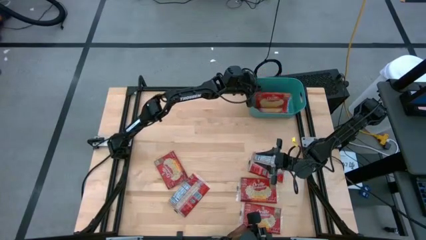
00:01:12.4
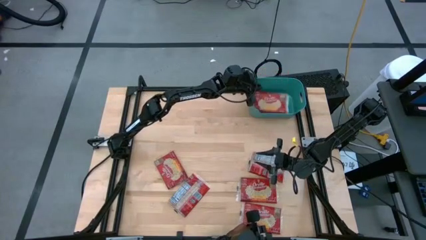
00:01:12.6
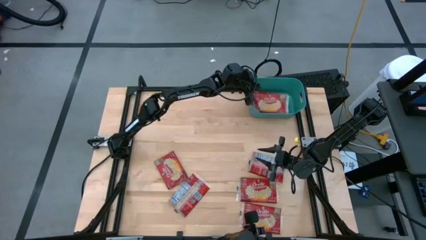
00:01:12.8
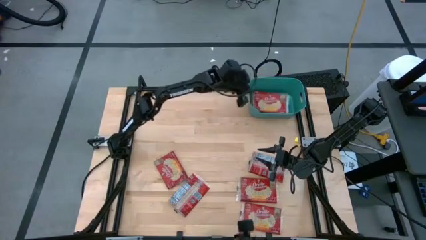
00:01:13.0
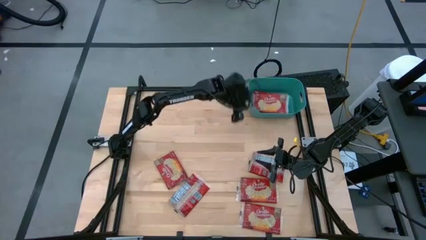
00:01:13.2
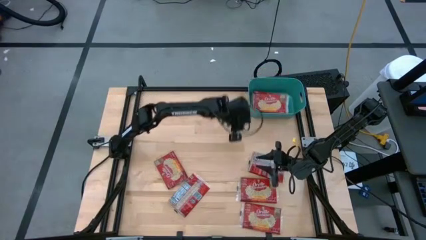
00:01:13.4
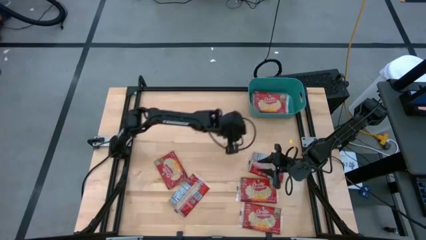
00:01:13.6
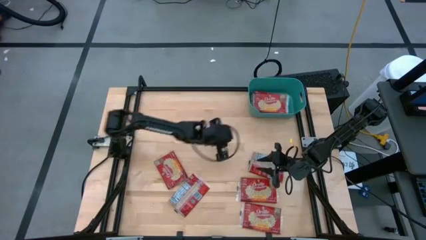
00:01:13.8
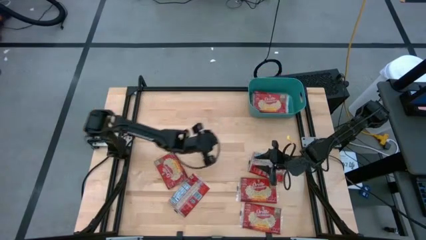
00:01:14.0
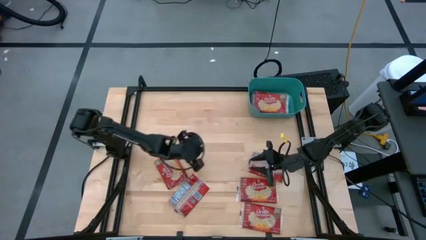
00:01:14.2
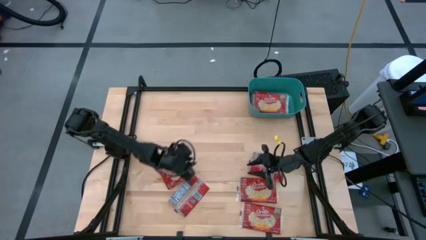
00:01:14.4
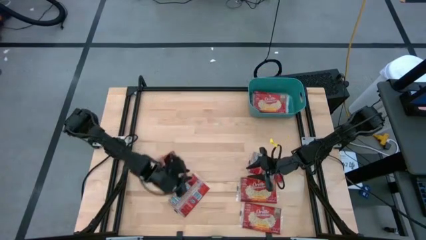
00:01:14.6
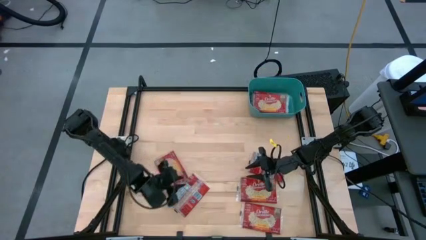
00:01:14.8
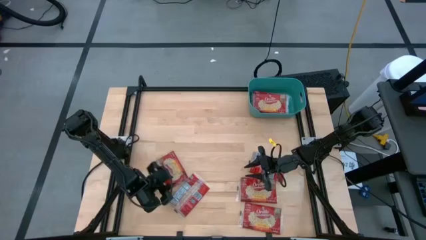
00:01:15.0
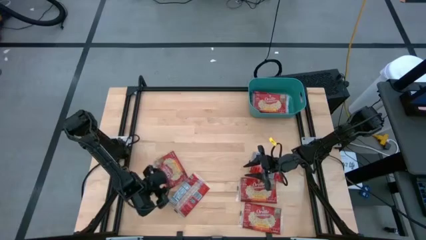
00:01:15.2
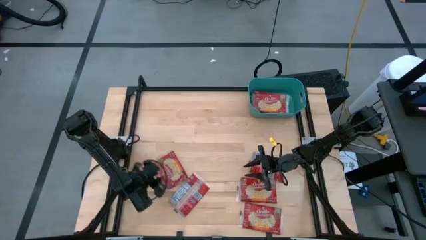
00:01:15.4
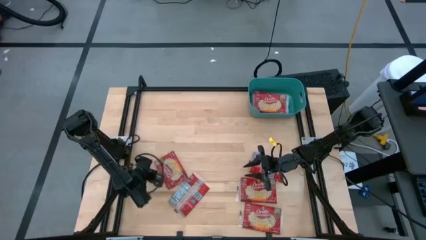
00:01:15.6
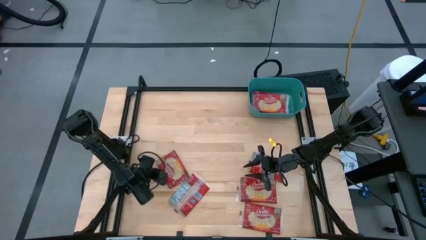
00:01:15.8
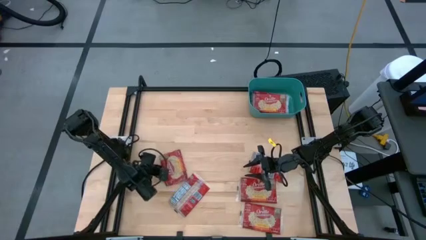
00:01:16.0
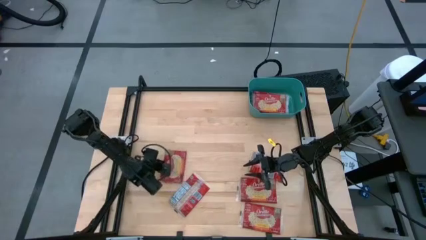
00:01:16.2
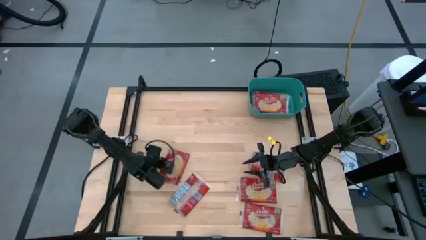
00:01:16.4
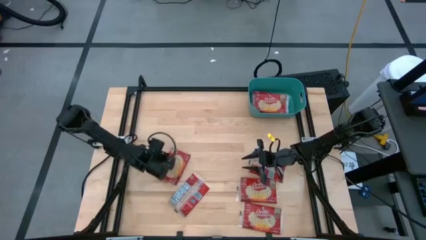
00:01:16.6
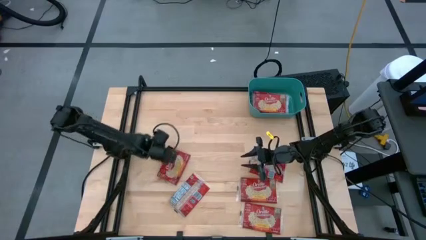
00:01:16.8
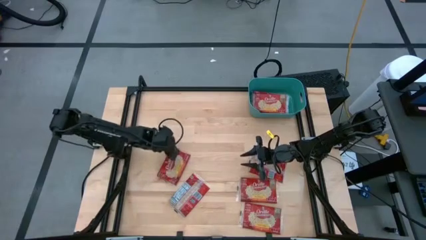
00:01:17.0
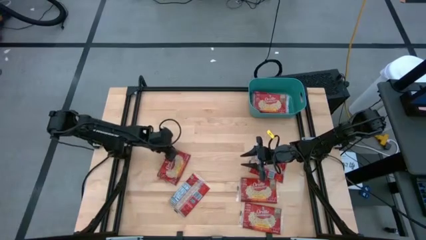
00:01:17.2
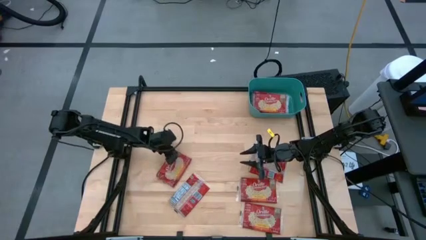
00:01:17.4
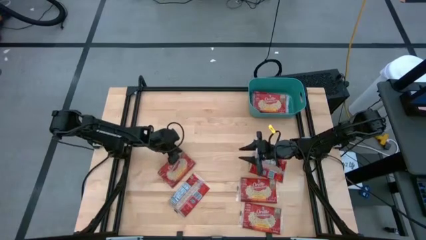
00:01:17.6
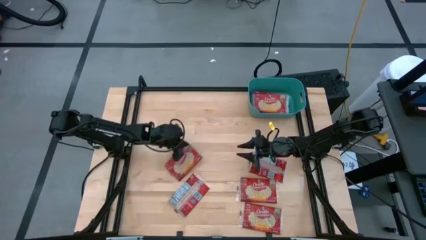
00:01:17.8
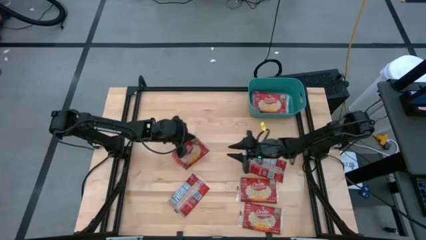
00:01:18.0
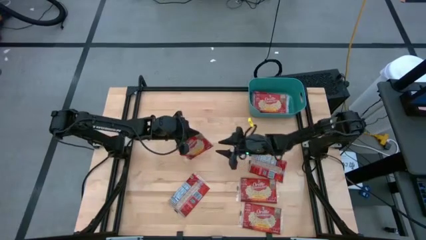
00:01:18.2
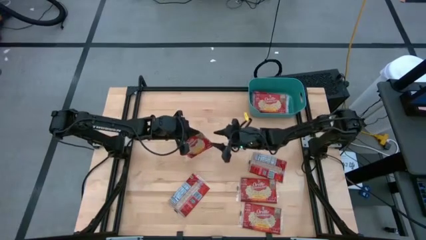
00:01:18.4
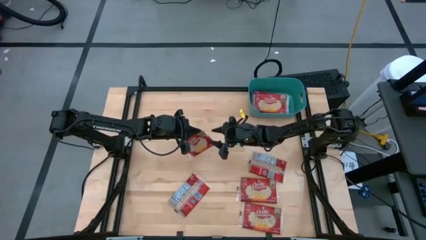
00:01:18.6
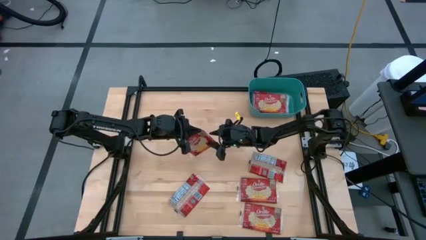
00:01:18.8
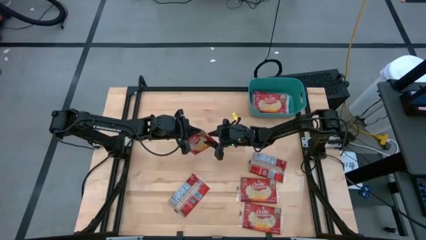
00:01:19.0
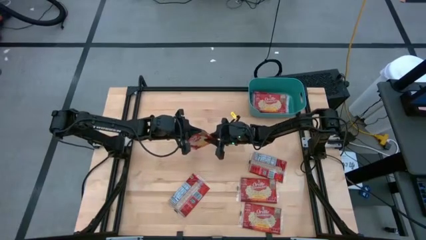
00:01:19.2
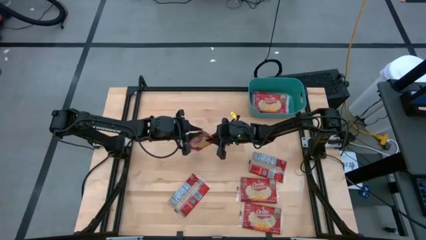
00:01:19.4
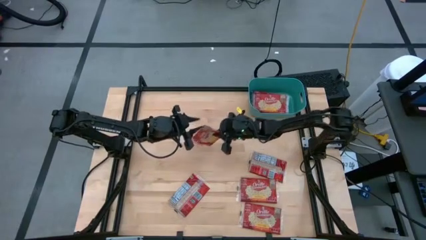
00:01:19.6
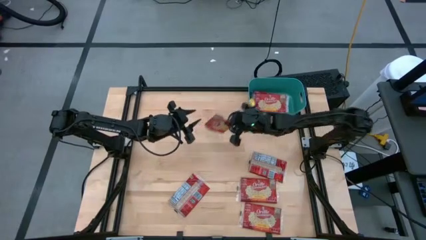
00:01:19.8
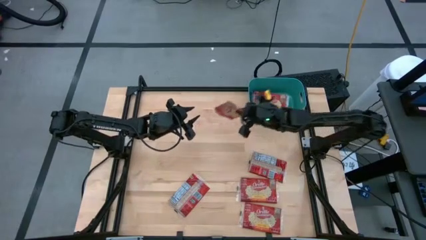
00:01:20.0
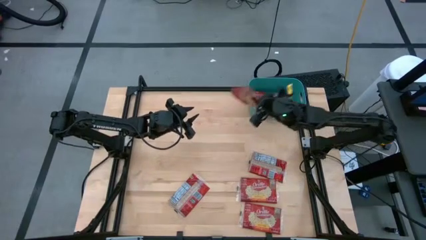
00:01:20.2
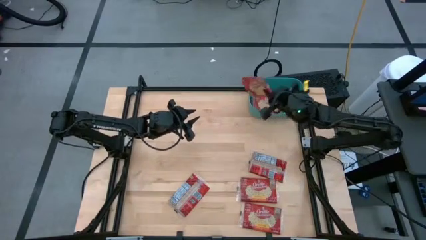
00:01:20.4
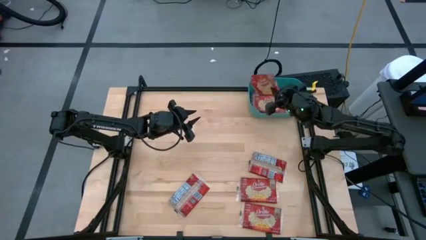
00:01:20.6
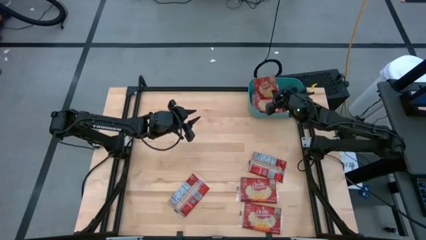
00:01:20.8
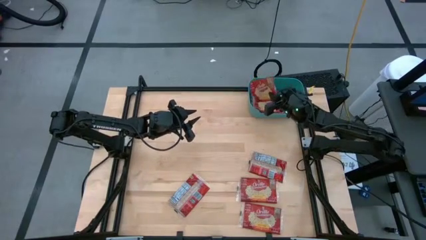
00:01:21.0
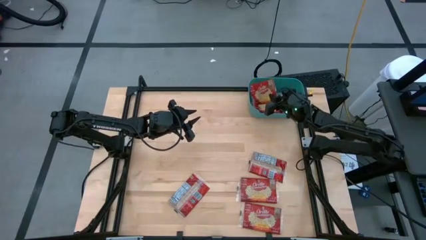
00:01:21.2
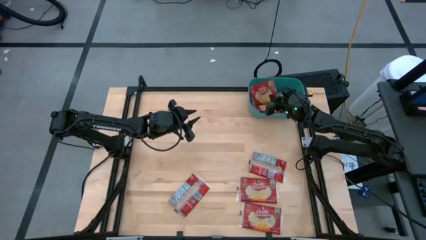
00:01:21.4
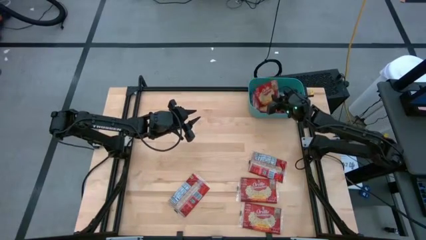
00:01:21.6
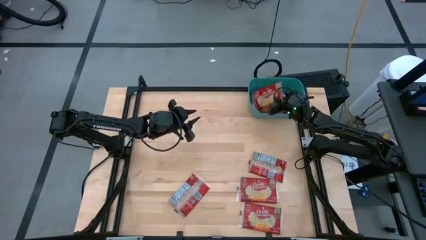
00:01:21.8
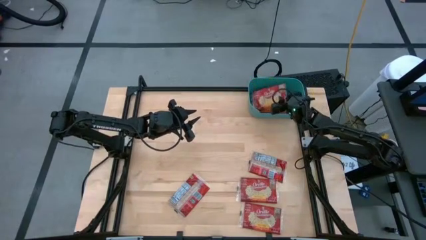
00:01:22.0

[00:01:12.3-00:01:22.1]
Task: Sort popcorn bags into baskets
Put the red popcorn bag into the blue bin

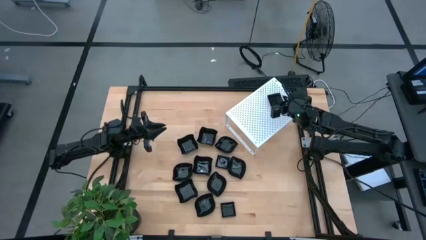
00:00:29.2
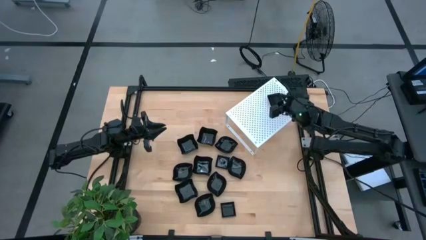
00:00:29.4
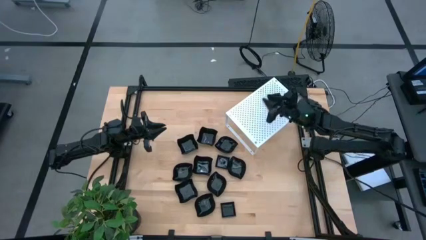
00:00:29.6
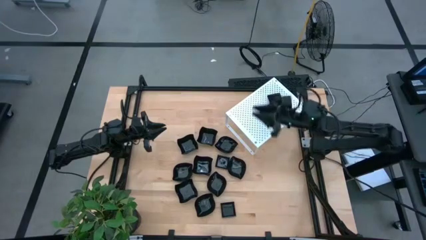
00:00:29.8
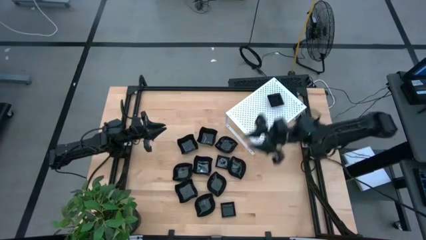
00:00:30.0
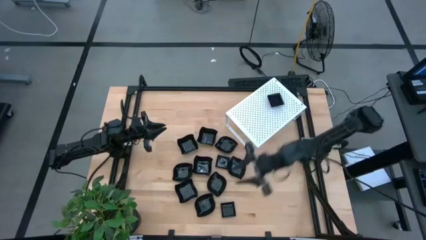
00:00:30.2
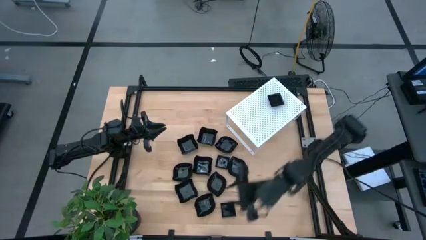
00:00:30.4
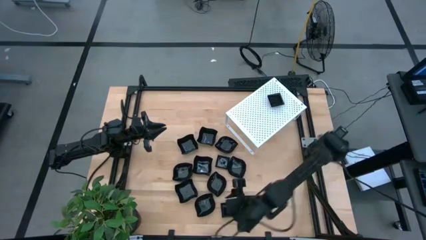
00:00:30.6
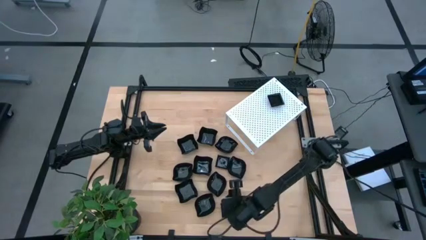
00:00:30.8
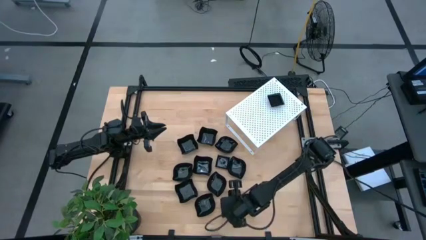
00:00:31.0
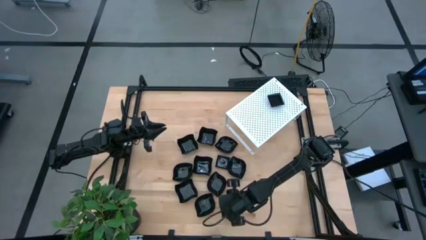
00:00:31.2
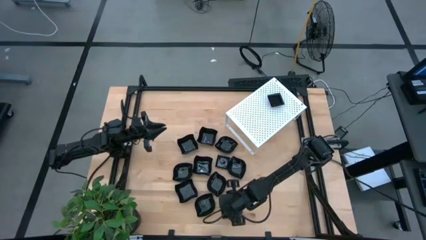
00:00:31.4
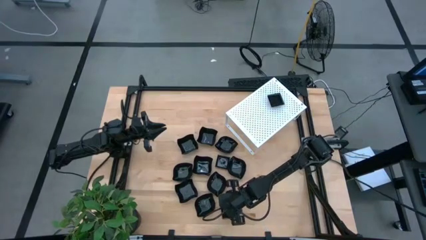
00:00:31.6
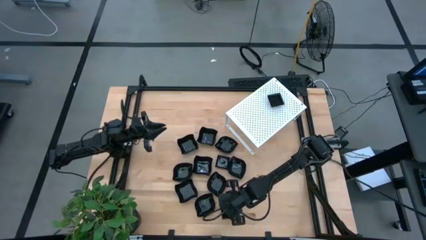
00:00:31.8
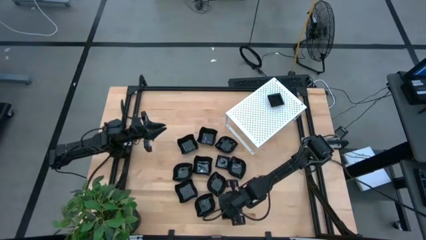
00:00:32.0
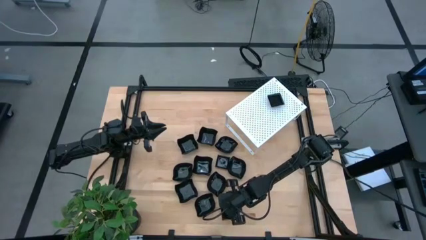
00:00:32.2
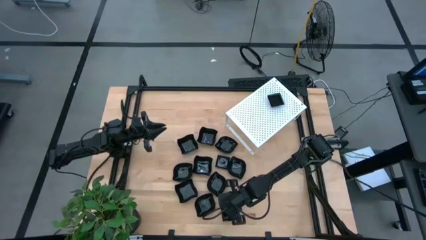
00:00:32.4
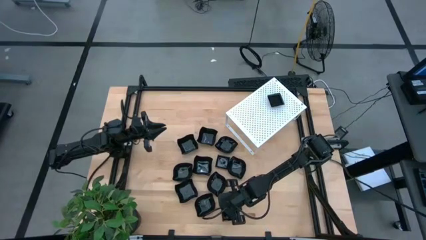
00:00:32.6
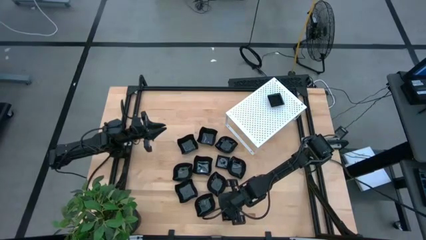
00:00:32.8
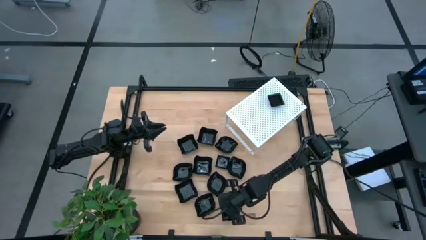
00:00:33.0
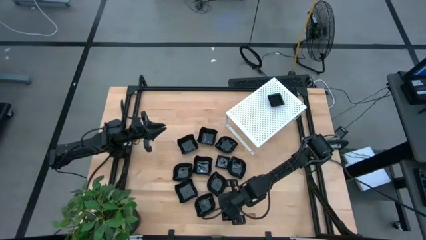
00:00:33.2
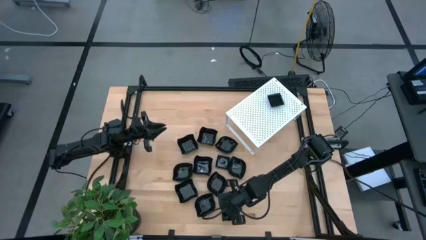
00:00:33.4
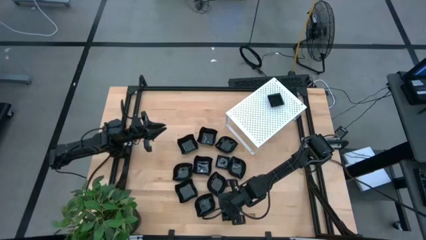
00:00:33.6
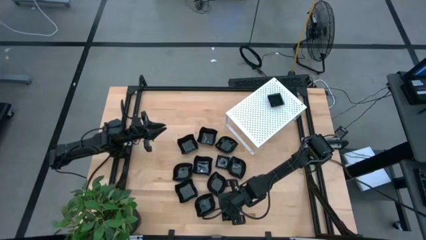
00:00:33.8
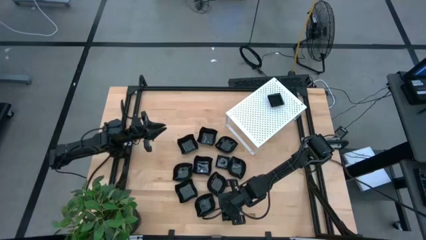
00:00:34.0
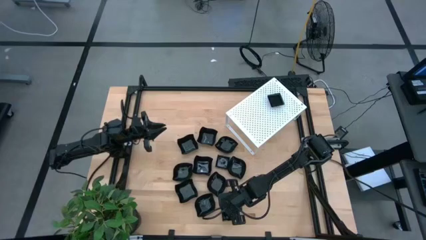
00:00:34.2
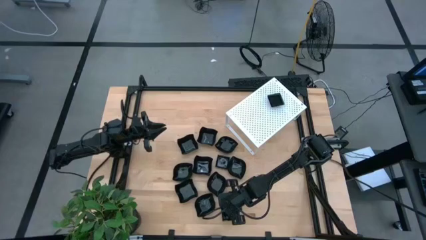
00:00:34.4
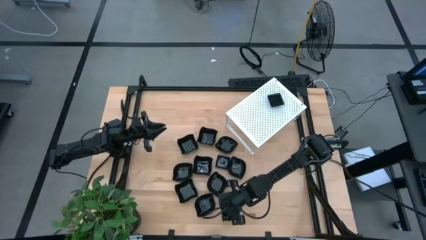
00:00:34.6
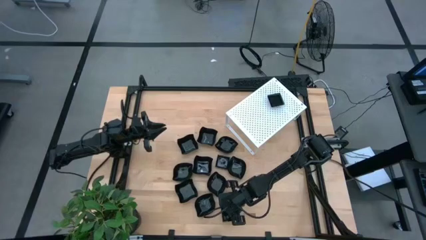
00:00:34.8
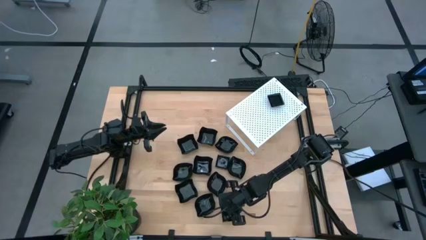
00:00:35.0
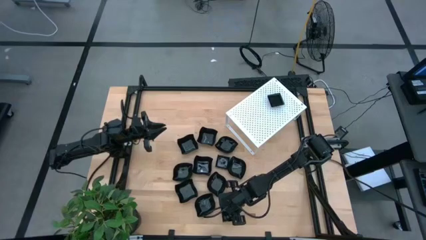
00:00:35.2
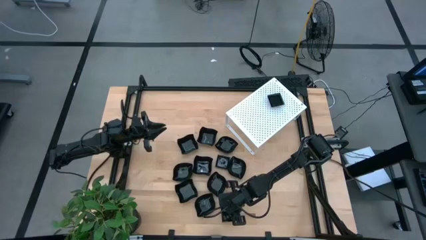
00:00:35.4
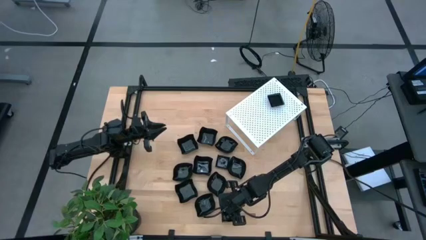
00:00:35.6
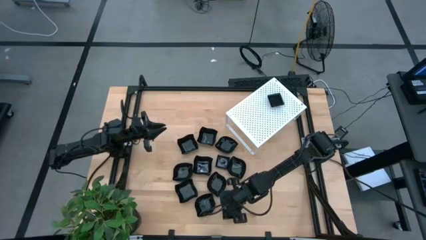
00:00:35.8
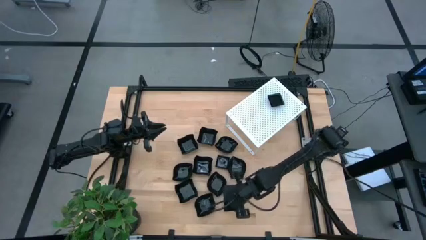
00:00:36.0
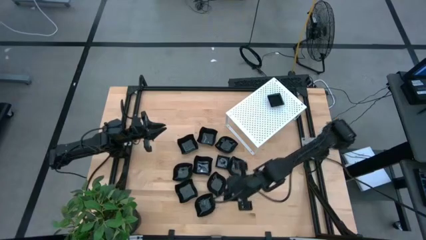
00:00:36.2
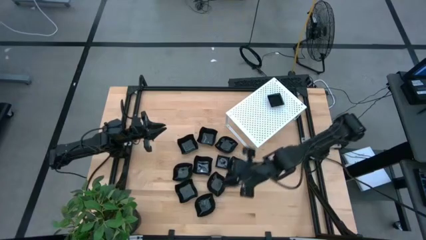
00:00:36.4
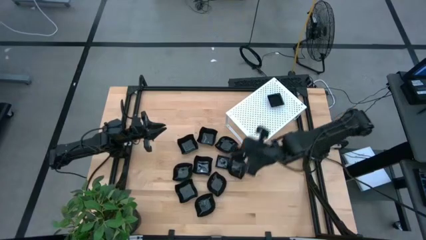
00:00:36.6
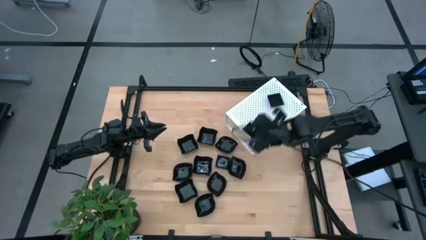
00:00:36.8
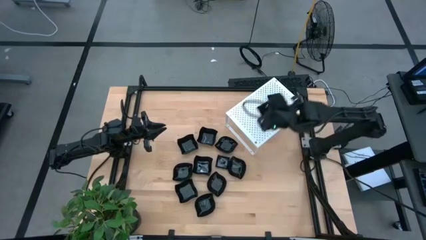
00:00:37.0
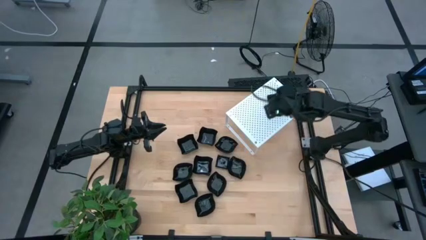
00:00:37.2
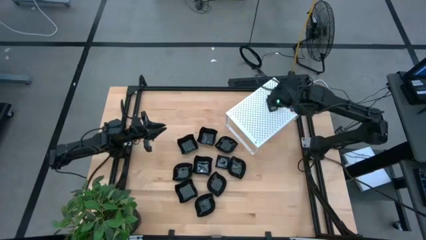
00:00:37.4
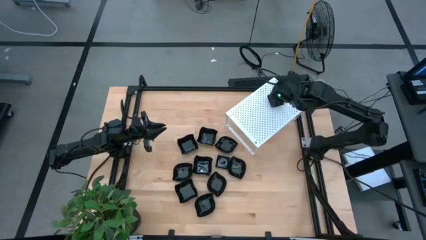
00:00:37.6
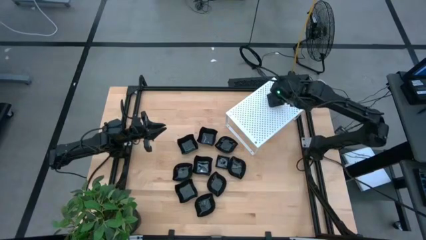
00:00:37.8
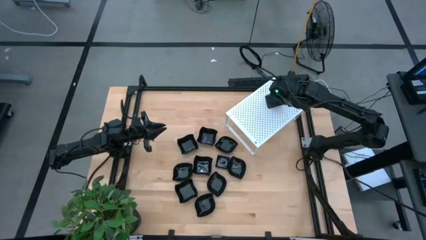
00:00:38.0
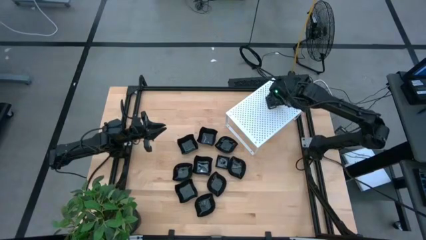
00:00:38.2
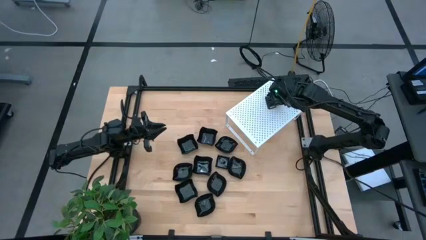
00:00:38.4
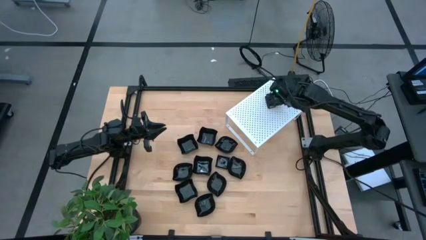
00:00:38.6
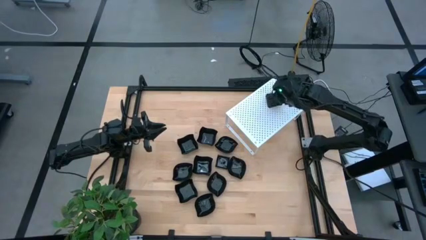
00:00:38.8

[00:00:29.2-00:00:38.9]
Task: Pick & Place Mini shaped plates
Stack the black square plate on top of the black square plates on the shelf
